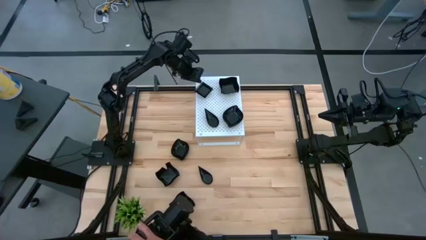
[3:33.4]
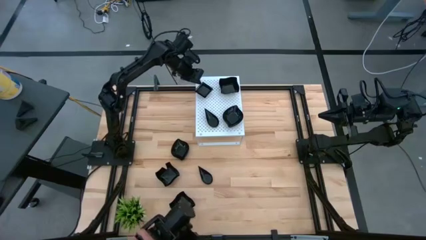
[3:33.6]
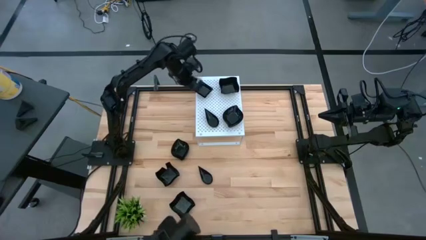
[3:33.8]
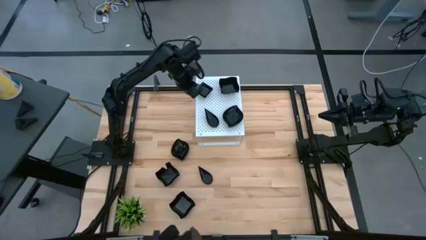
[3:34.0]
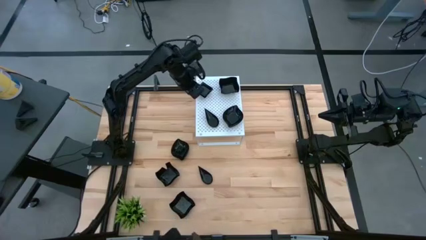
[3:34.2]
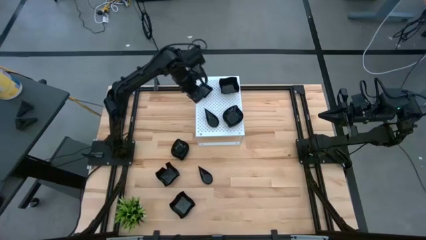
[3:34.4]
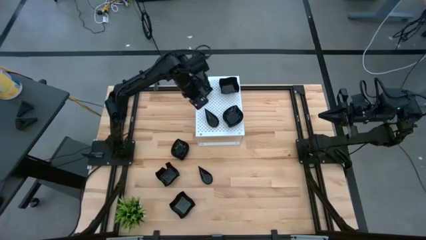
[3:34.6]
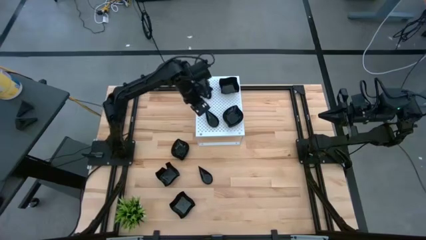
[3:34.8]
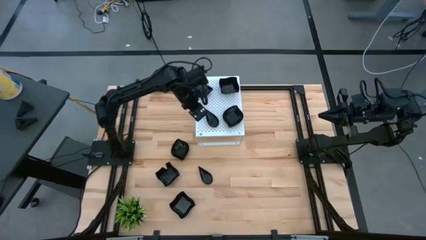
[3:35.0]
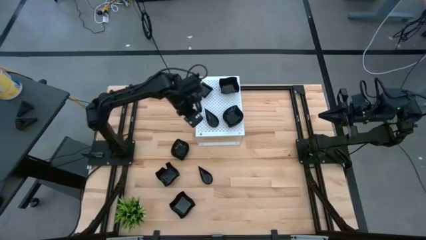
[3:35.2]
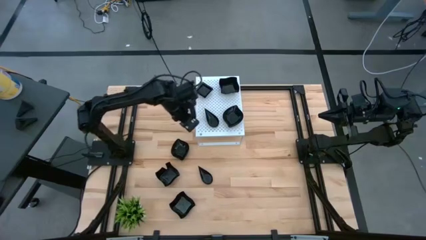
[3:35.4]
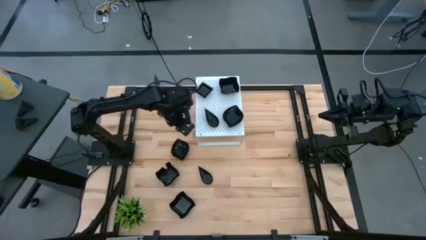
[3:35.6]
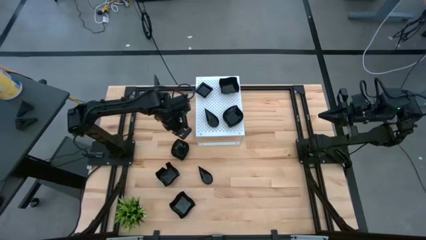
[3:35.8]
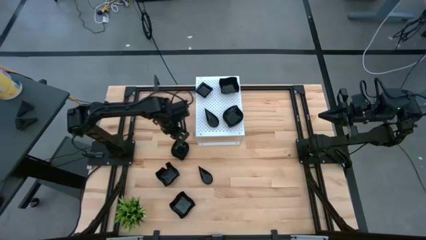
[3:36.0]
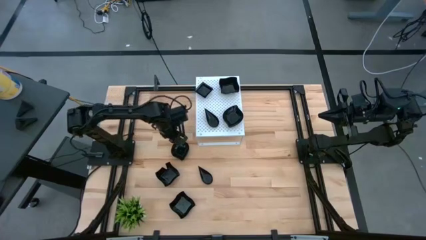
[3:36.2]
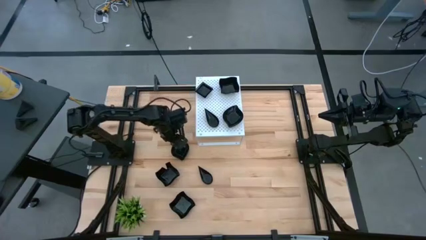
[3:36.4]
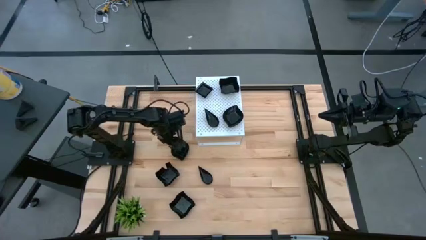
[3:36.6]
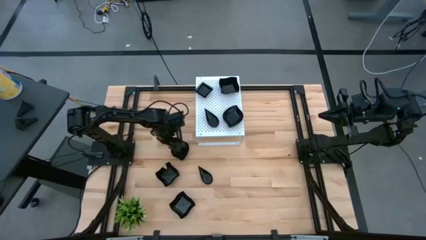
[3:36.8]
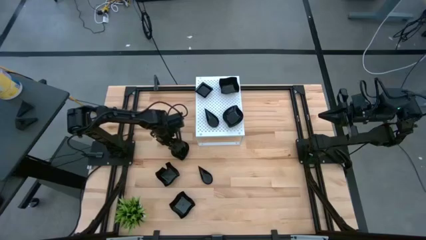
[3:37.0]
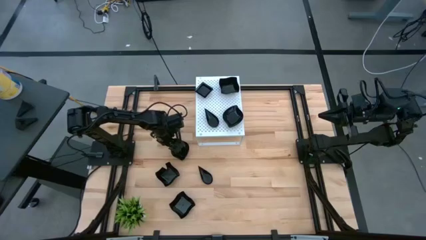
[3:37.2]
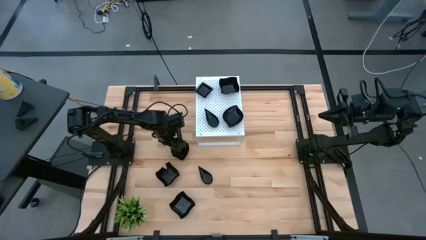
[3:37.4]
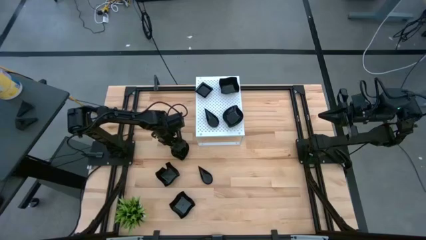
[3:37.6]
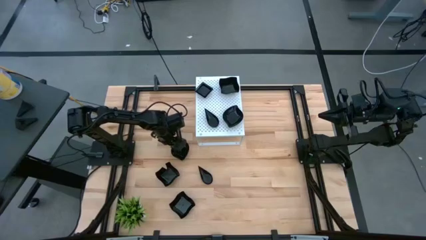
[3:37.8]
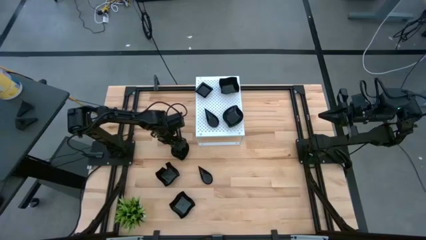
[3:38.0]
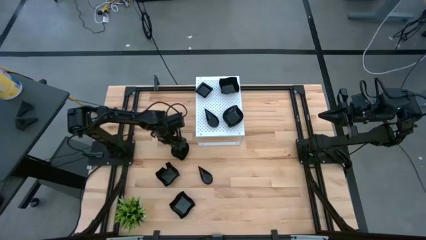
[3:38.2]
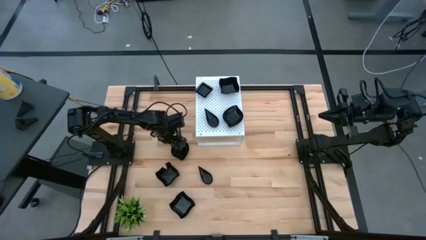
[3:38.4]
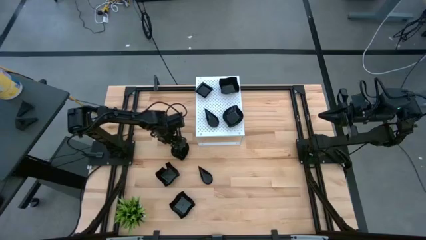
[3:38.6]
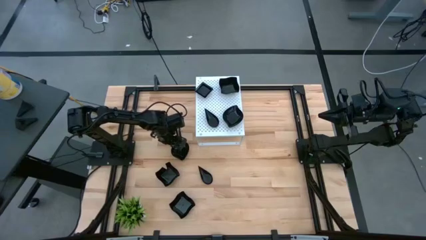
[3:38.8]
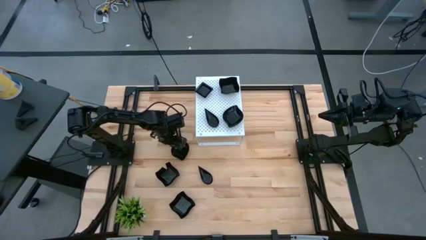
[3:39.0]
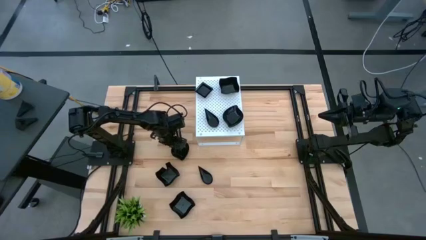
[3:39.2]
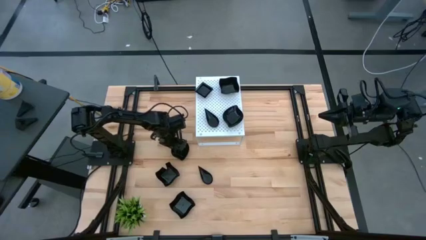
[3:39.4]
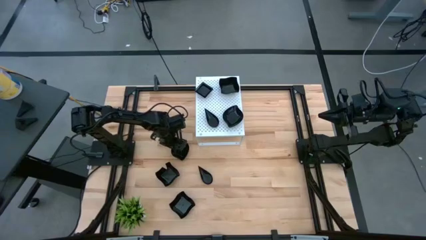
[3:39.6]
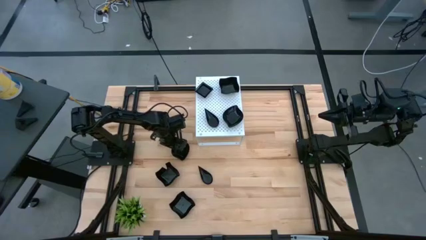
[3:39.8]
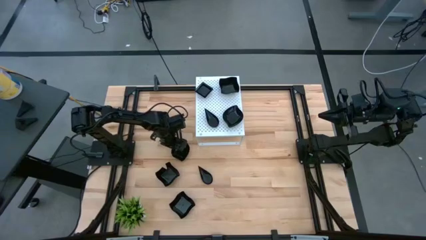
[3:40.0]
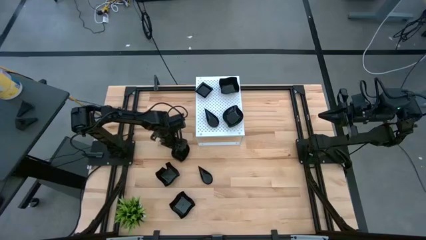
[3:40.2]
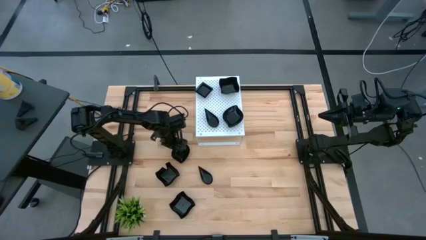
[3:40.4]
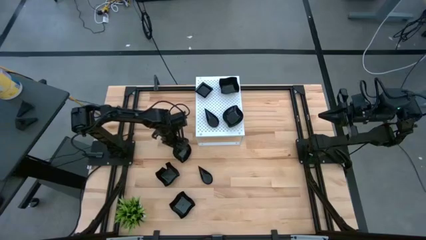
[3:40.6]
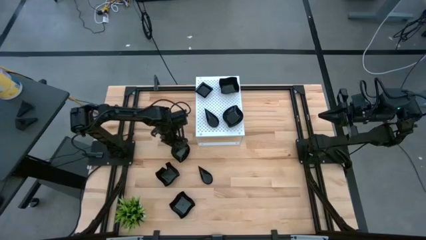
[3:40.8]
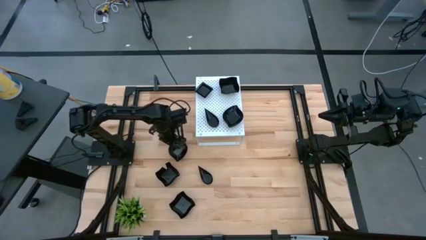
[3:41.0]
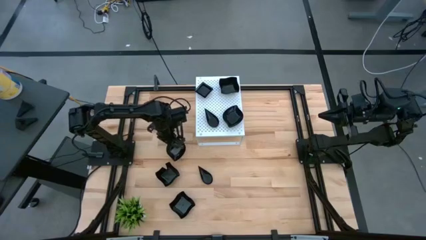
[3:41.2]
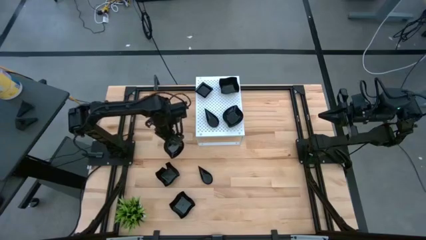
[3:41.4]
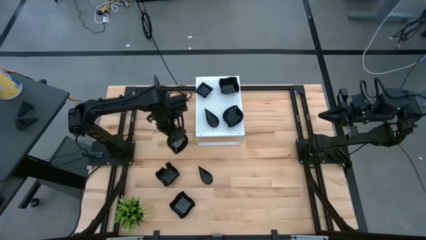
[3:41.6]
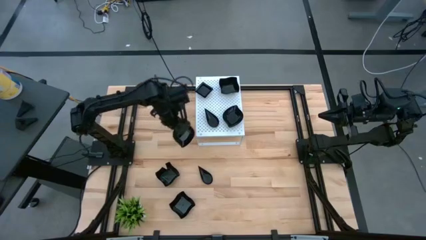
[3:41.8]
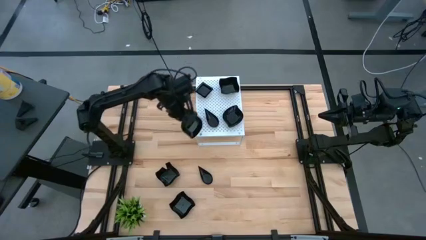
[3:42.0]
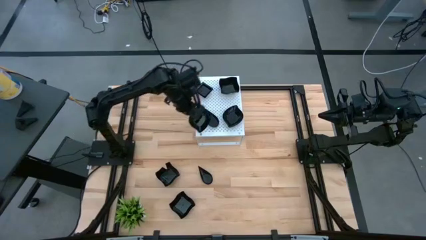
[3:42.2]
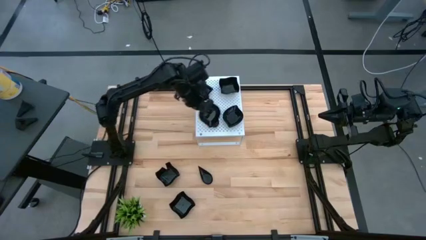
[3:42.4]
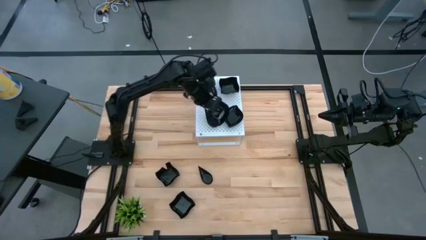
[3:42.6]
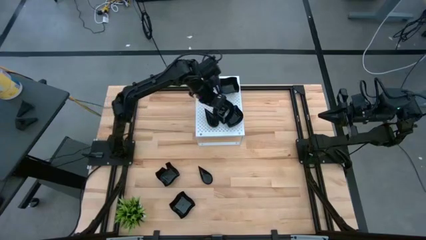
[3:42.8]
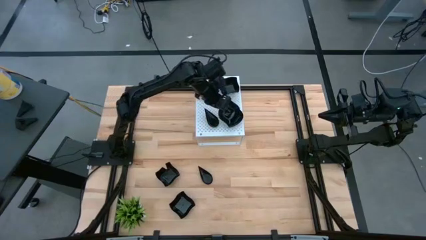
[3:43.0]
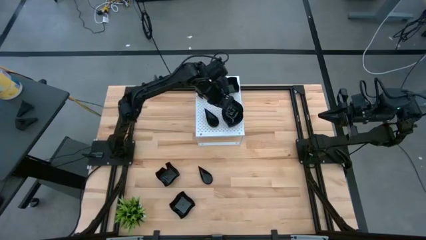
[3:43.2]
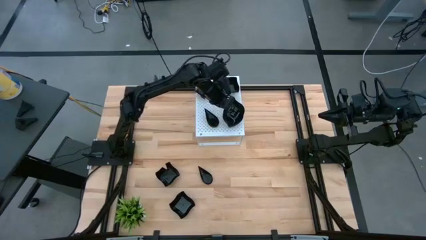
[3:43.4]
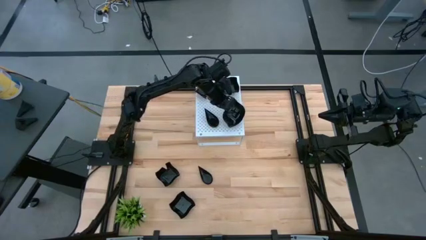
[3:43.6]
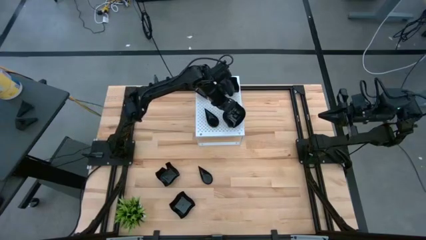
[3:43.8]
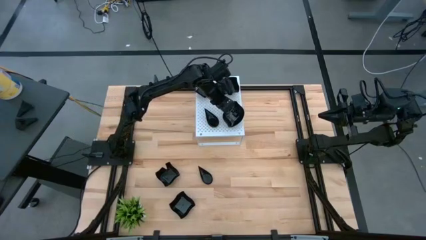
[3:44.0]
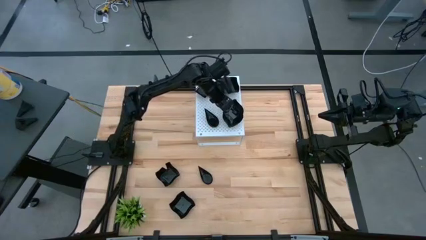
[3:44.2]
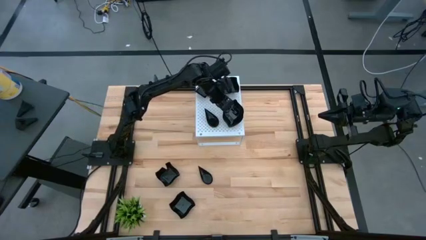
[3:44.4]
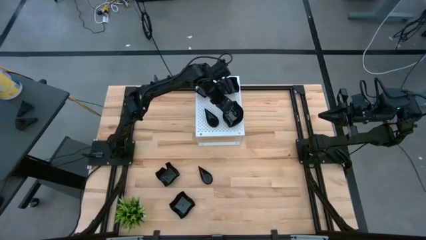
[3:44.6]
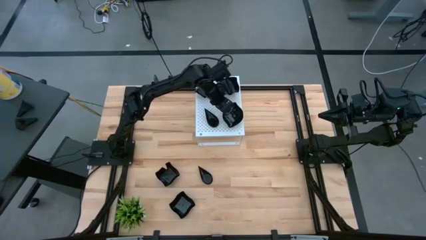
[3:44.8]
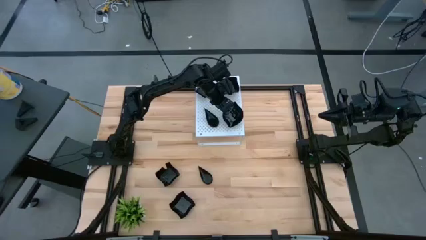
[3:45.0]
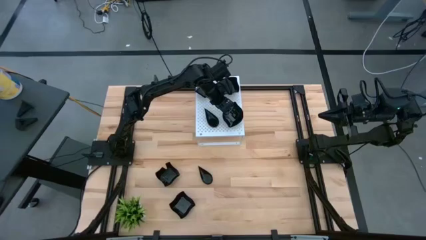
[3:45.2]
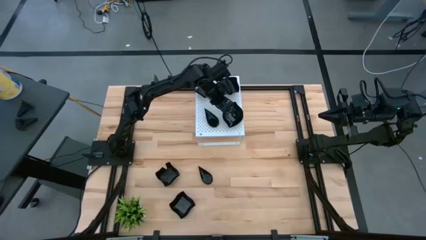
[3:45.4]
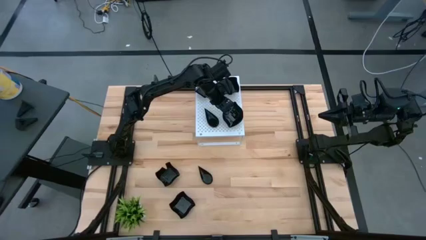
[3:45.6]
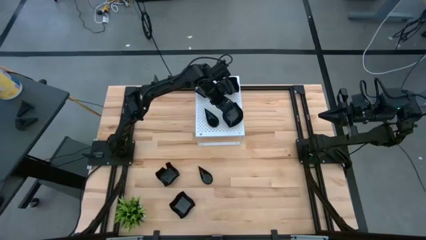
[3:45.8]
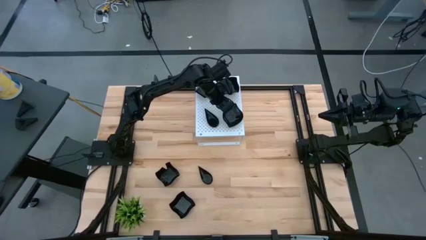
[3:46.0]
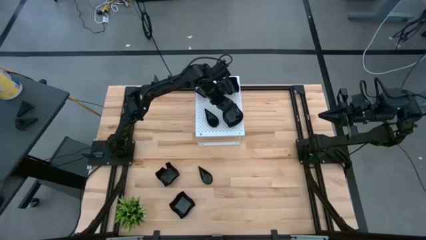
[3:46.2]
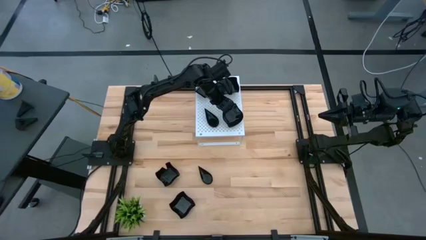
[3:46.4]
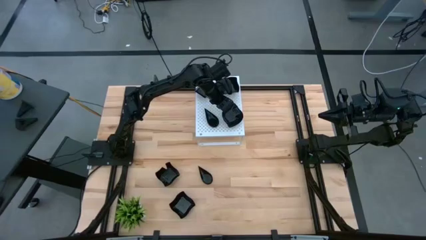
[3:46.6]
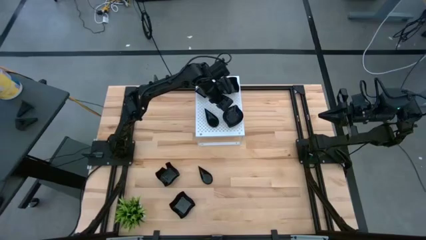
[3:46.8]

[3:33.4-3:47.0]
Task: Pick & Place Mini shaped plates
Stack the leaf-shaped plate on top of the leaf-shaped plate on the shelf
